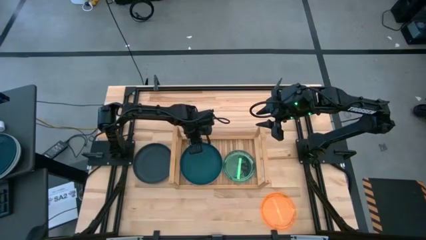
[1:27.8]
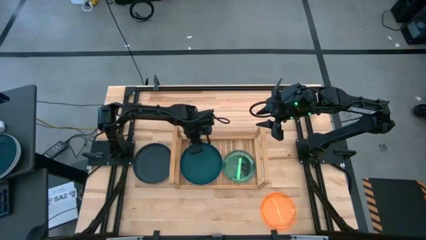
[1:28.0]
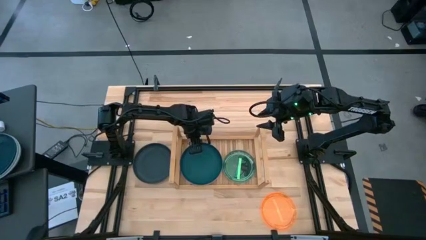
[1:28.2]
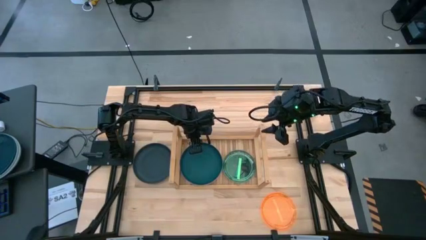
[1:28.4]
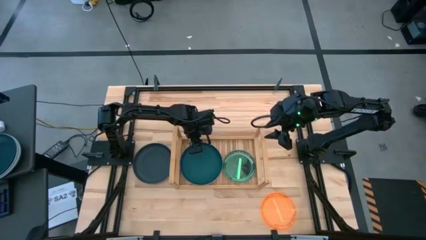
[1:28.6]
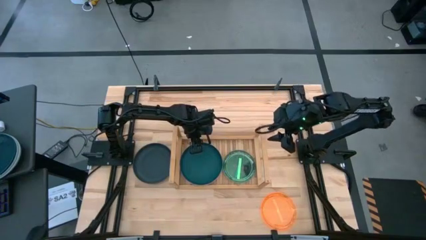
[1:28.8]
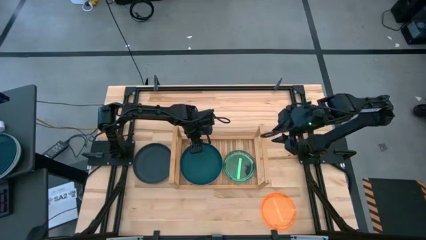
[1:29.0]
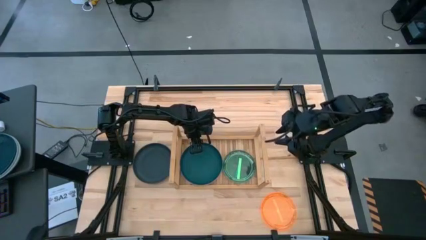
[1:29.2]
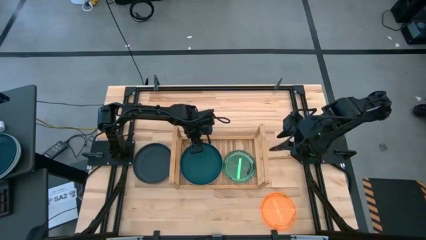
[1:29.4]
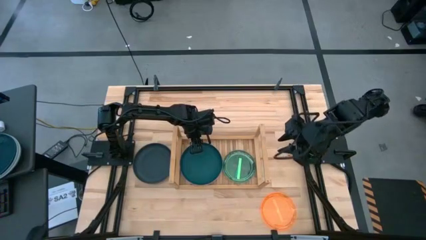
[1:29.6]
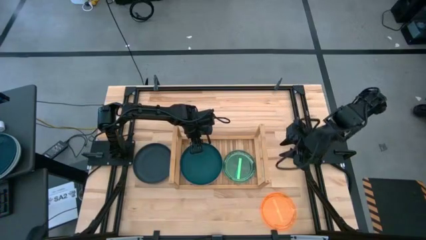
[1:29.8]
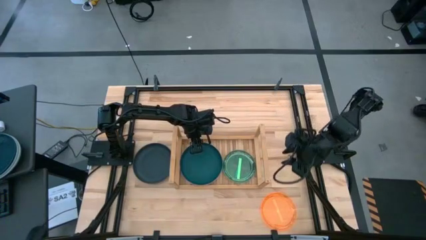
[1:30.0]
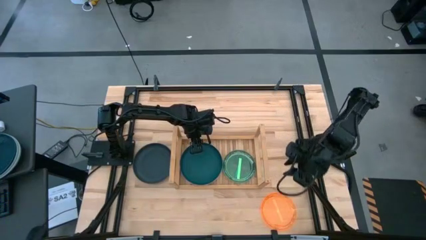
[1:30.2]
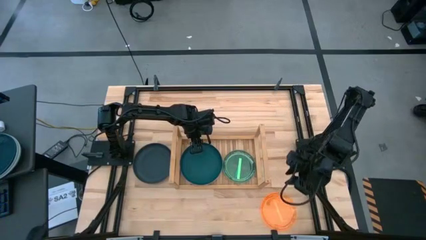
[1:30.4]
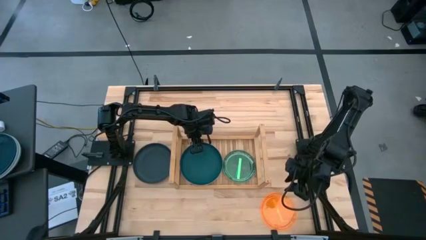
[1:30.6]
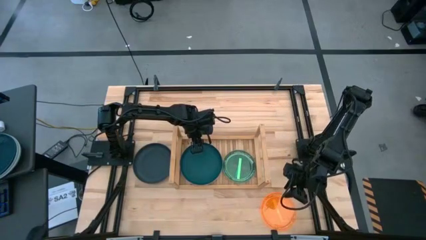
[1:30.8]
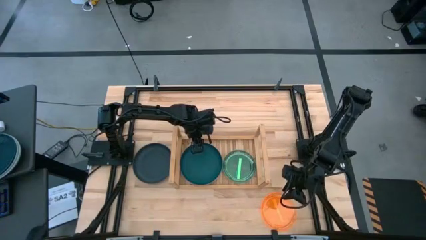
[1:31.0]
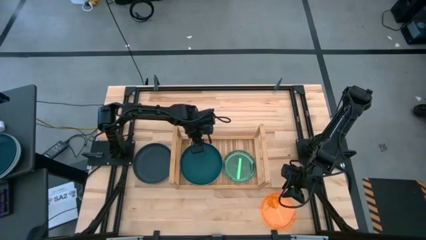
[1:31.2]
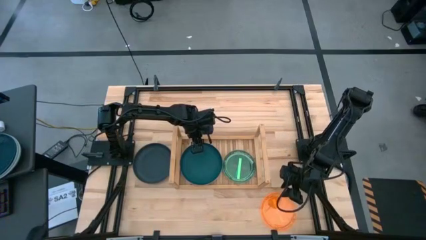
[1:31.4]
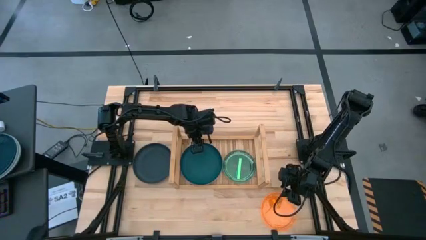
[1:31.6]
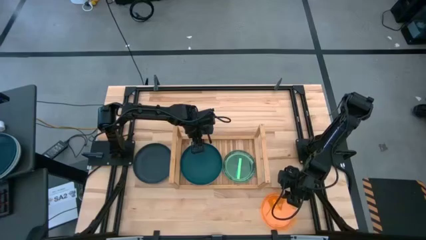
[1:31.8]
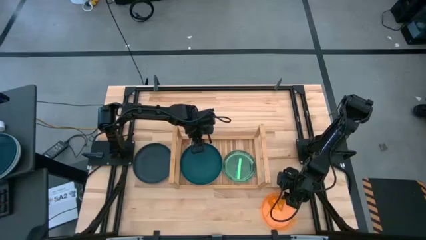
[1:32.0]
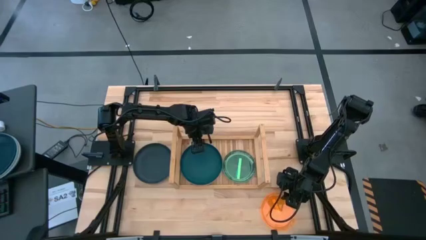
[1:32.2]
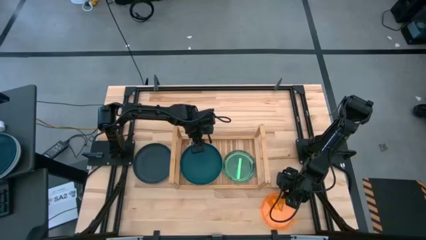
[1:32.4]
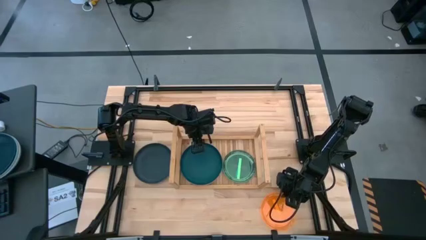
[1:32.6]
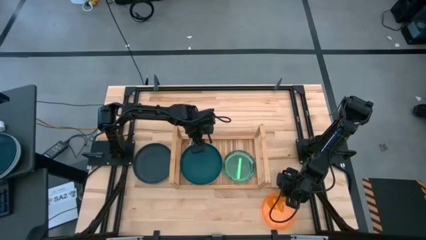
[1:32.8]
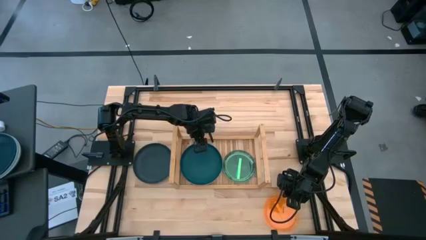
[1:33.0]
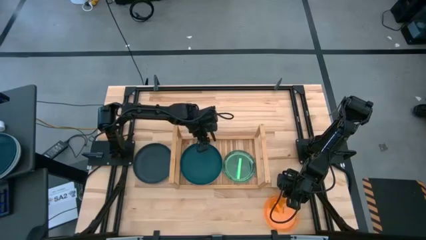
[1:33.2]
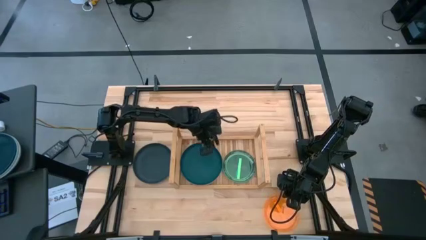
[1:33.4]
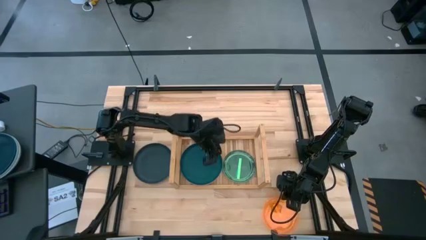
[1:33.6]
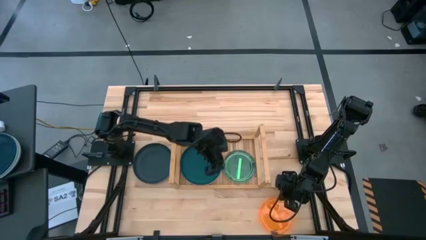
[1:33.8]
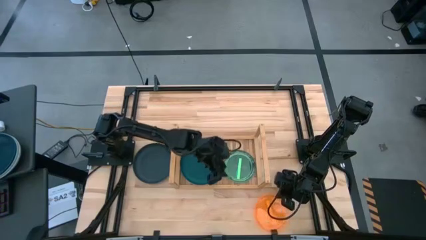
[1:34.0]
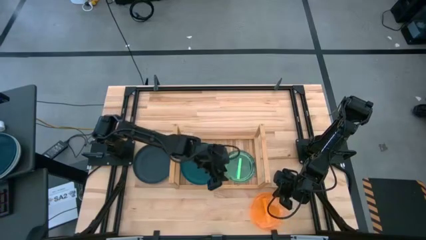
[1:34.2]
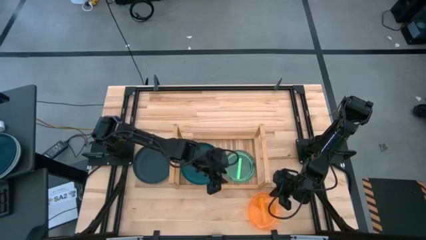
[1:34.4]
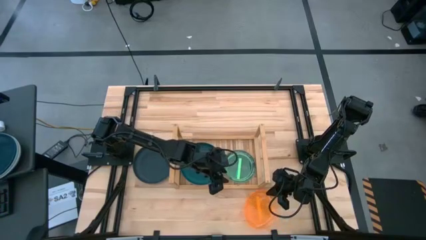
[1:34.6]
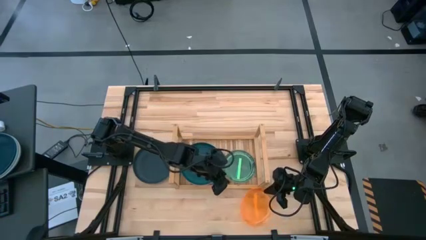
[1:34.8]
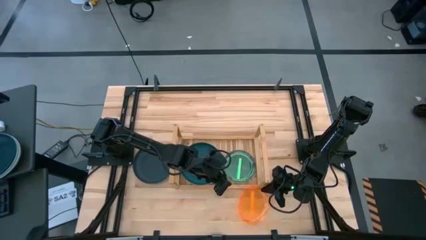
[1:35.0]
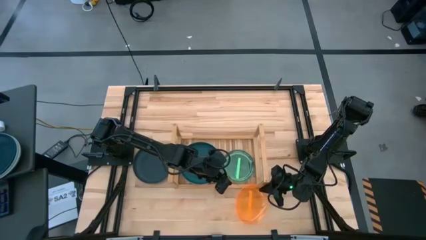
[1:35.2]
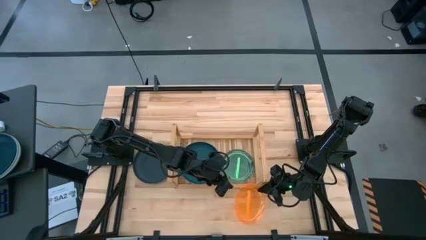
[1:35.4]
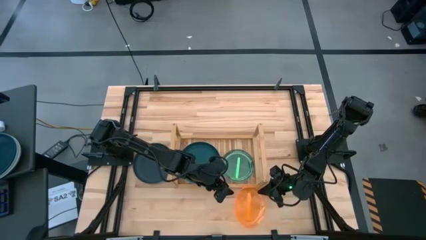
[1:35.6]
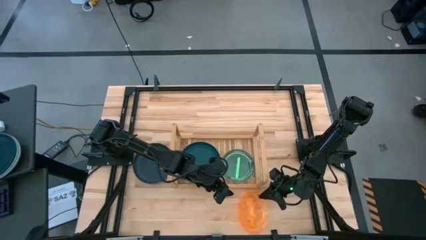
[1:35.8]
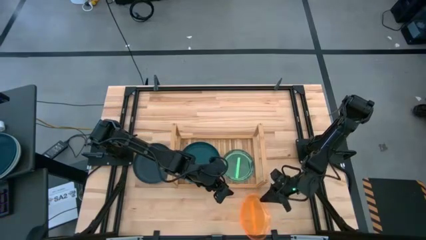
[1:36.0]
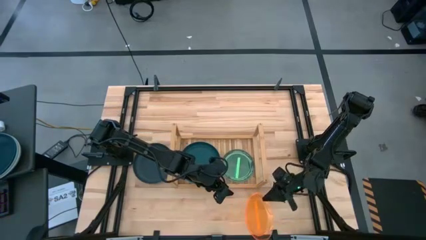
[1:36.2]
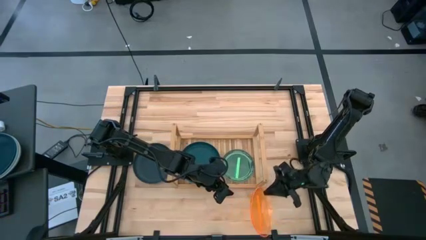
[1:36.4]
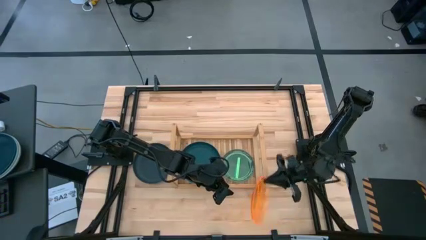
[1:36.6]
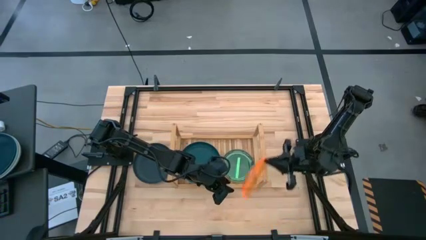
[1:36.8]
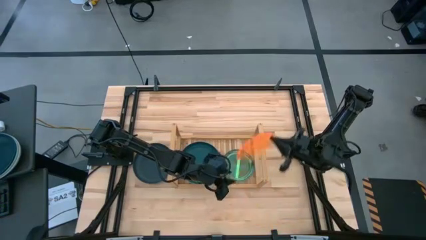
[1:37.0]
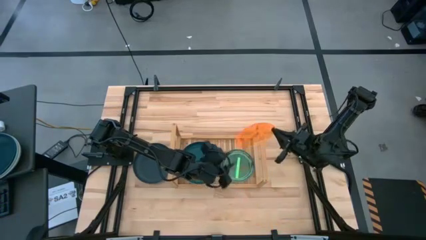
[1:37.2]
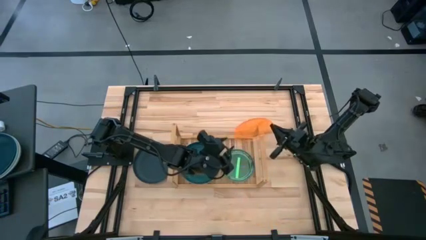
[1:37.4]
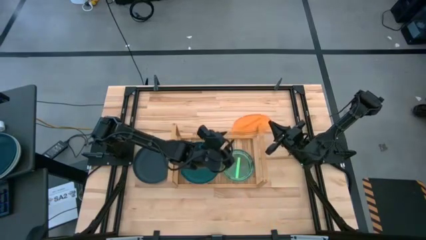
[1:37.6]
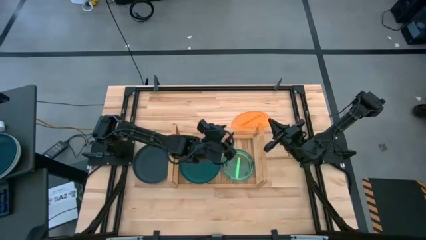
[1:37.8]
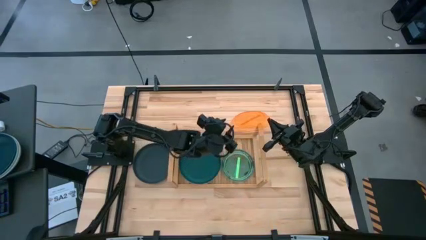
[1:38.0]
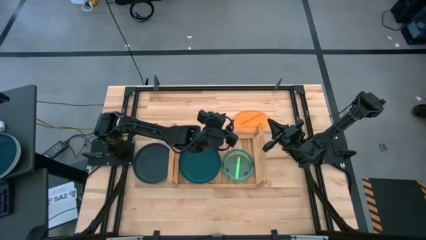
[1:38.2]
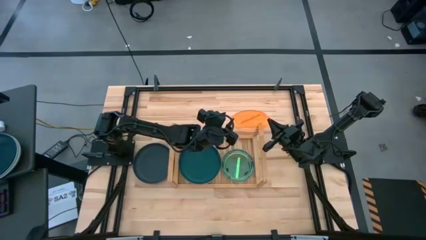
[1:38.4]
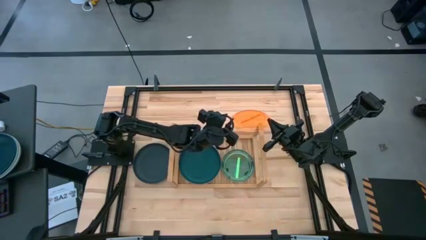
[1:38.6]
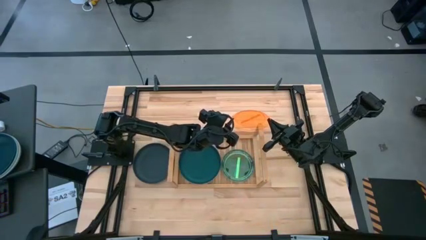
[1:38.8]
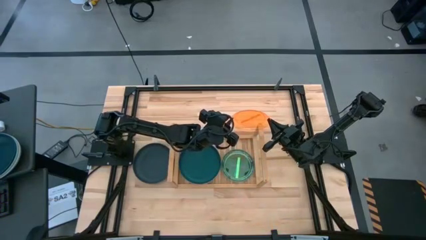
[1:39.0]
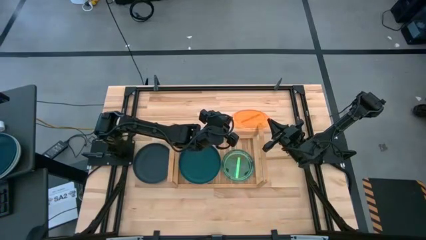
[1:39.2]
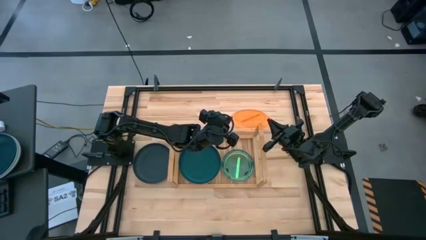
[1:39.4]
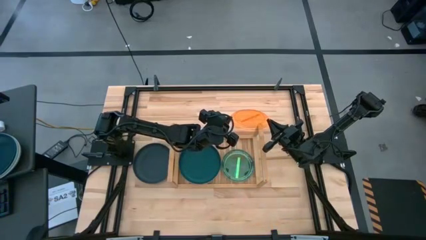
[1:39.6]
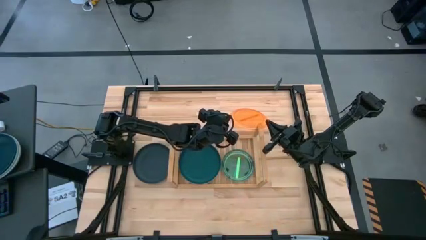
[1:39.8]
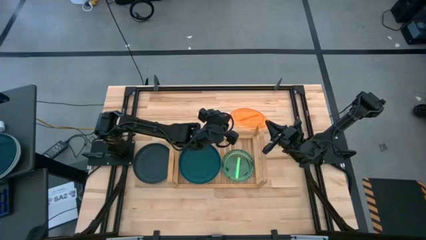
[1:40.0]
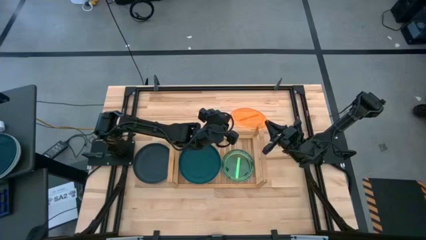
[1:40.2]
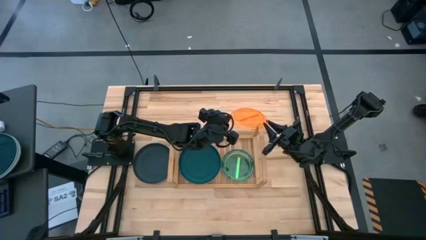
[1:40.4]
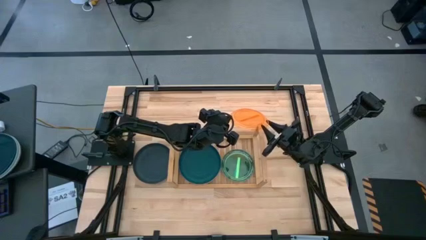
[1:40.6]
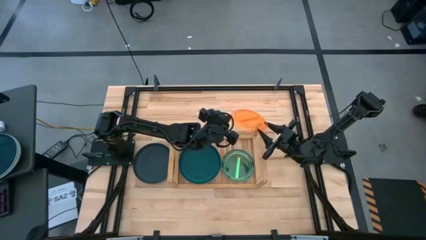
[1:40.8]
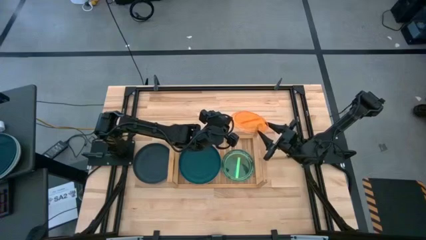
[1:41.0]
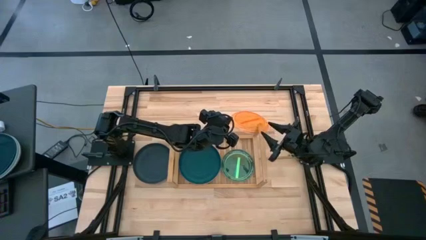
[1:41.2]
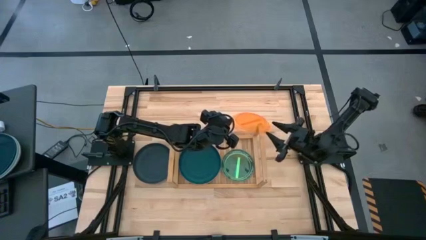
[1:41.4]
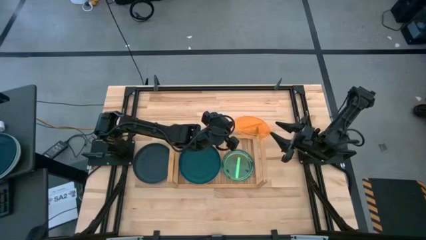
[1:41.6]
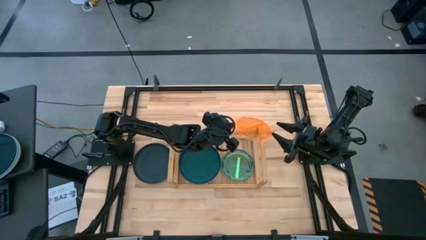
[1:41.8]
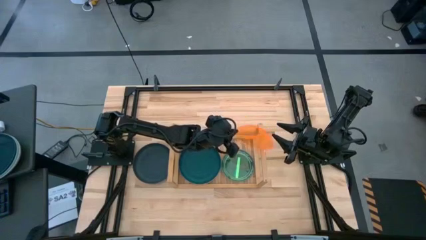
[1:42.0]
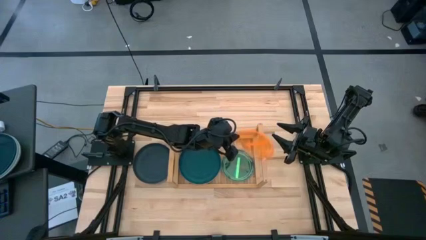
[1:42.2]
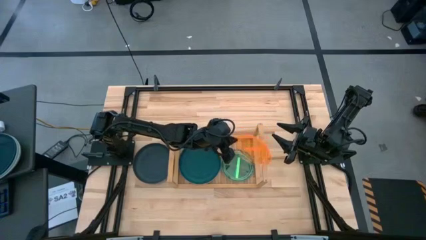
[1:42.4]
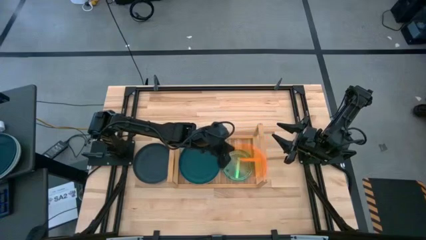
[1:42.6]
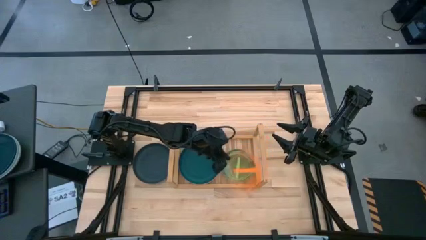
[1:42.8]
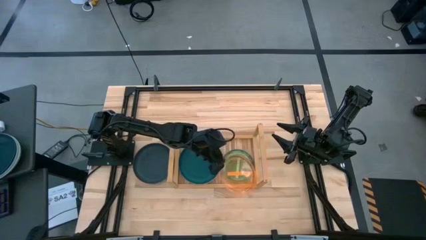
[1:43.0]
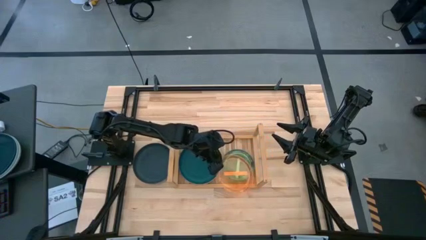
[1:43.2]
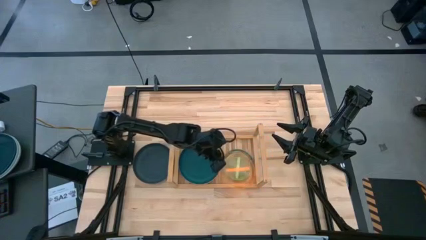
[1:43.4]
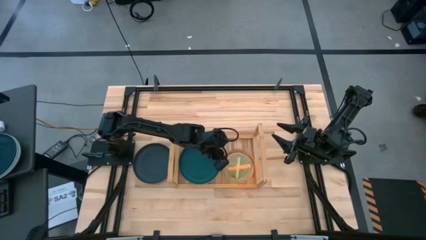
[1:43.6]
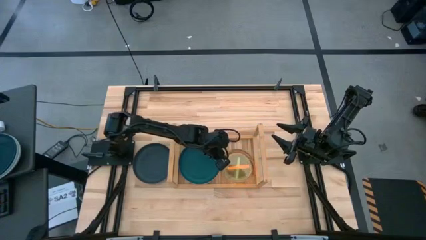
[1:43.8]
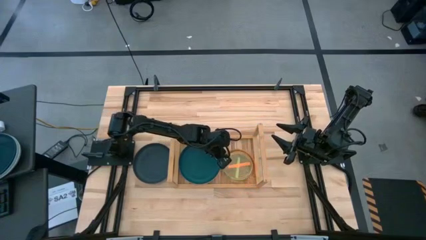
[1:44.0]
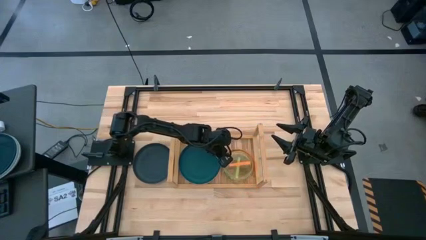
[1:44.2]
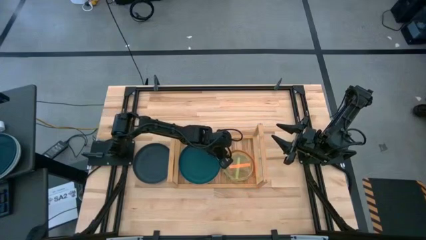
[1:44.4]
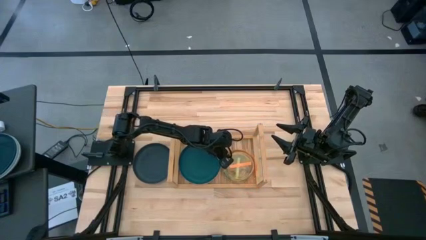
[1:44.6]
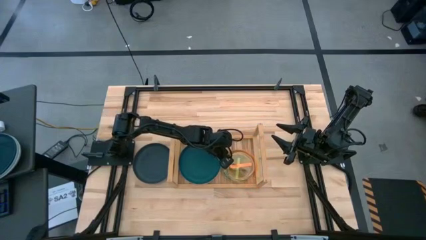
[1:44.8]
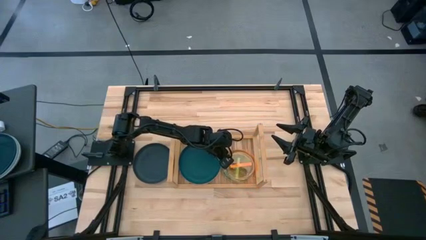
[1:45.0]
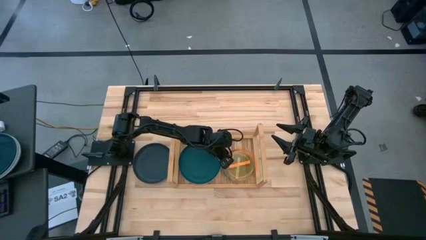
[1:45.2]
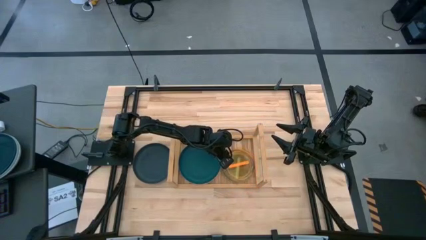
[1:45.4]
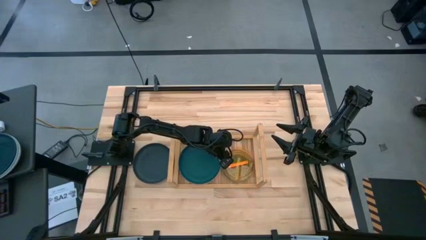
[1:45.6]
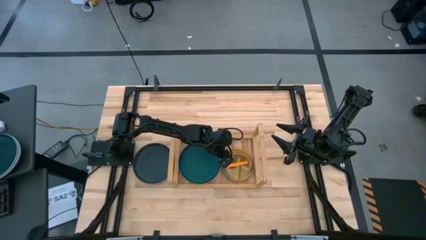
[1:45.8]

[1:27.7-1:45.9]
Task: Place and stack plates onto a shelf
Stack the orange plate on top of the green plate on the shelf
